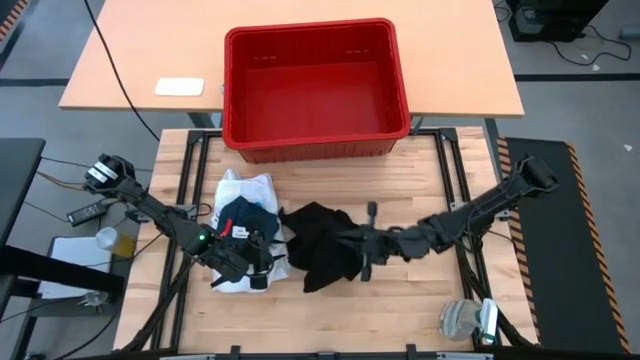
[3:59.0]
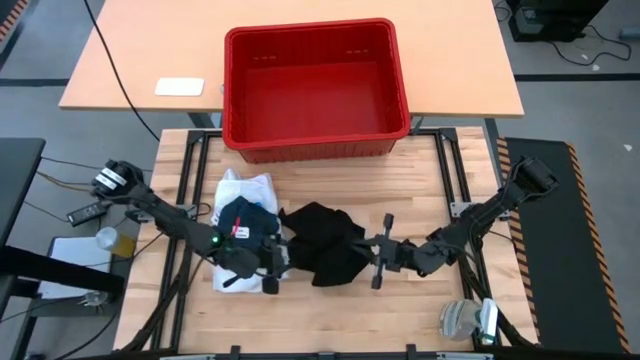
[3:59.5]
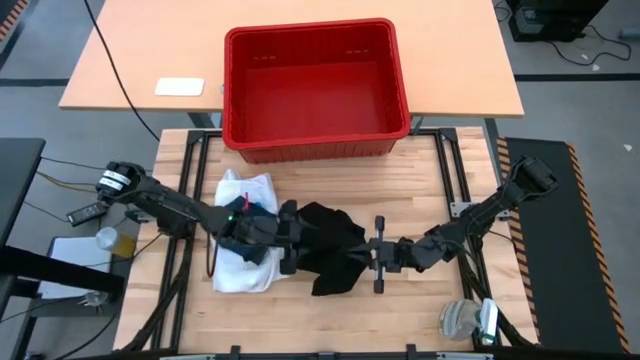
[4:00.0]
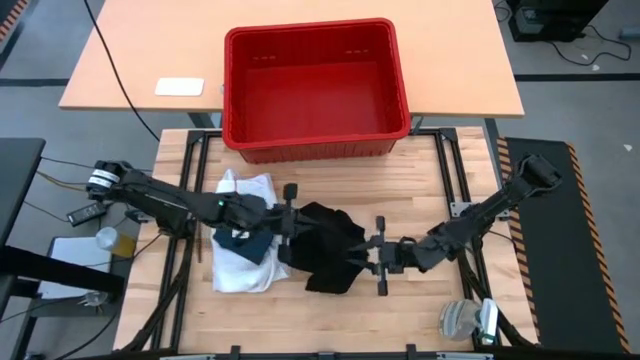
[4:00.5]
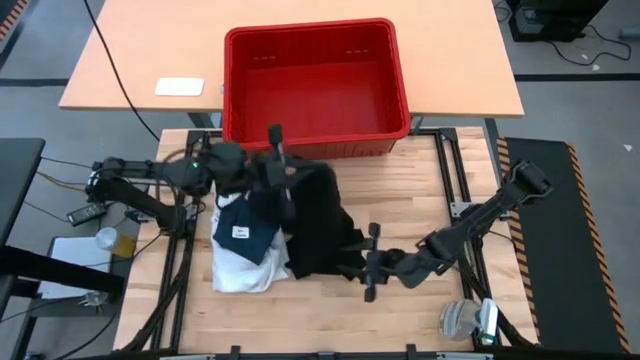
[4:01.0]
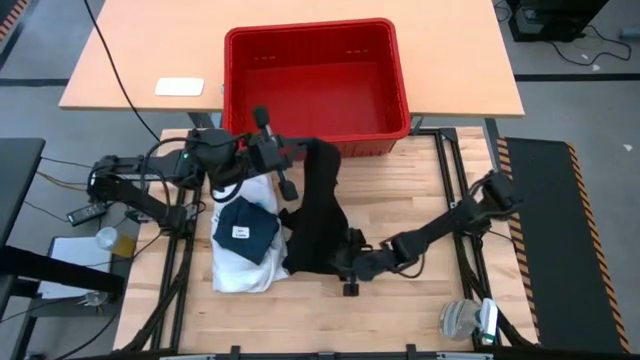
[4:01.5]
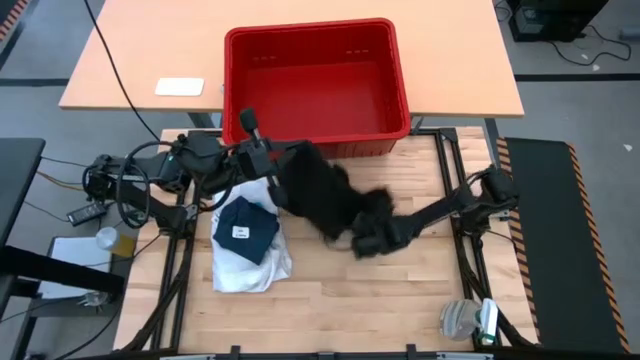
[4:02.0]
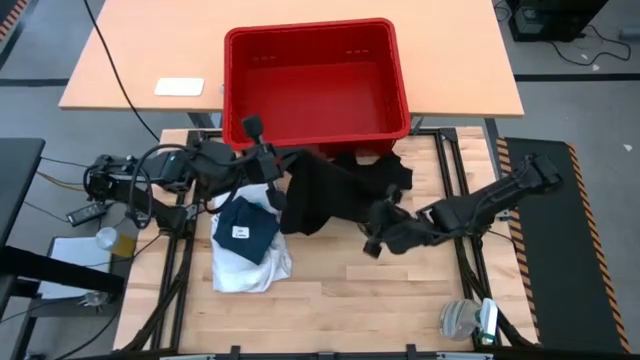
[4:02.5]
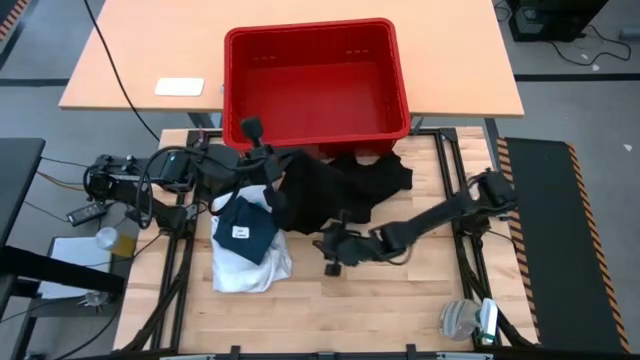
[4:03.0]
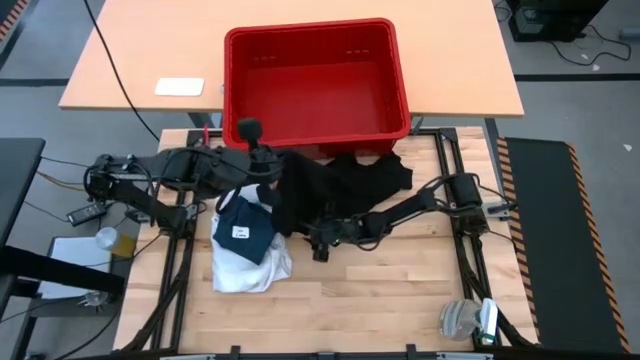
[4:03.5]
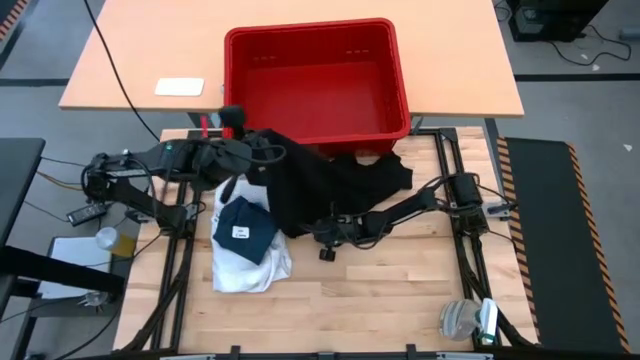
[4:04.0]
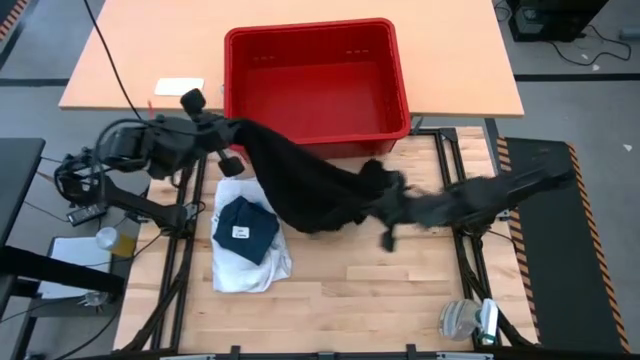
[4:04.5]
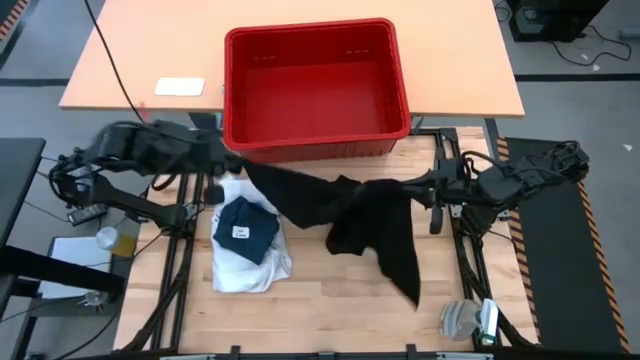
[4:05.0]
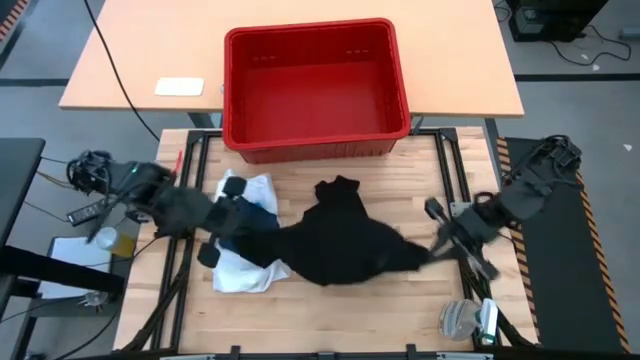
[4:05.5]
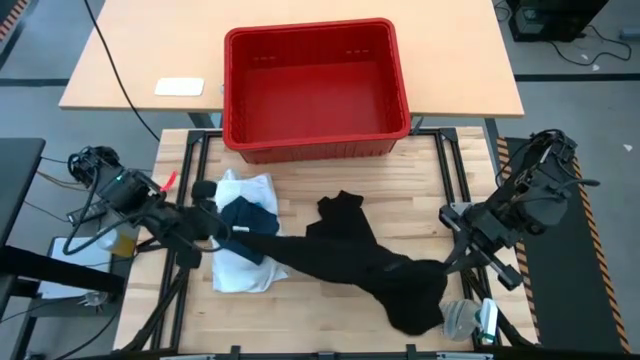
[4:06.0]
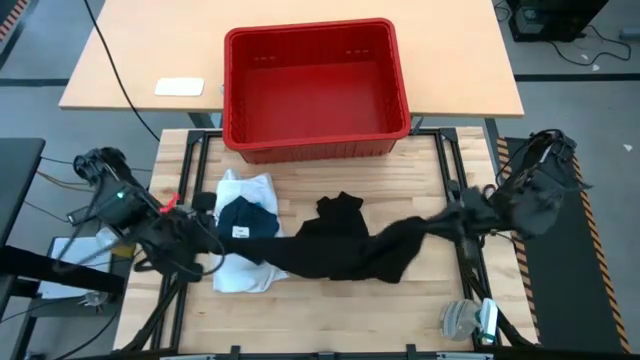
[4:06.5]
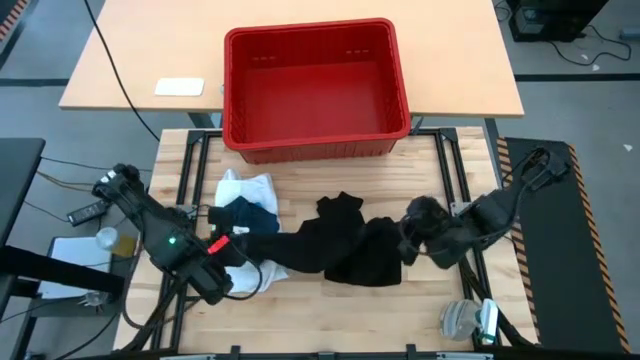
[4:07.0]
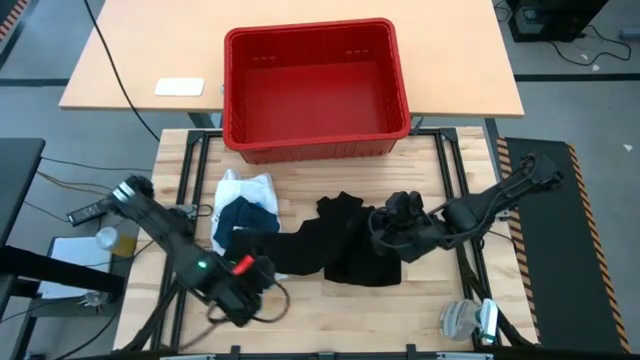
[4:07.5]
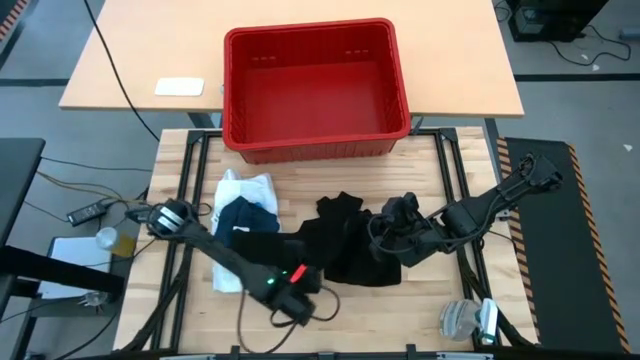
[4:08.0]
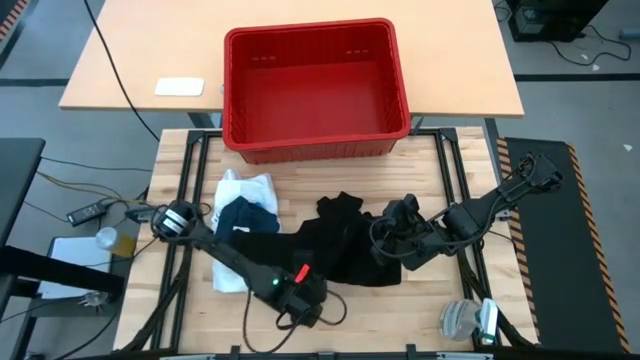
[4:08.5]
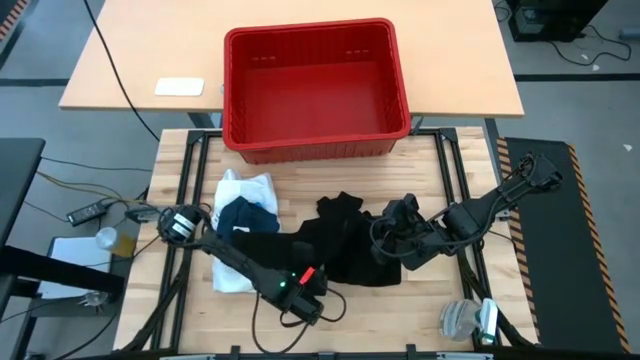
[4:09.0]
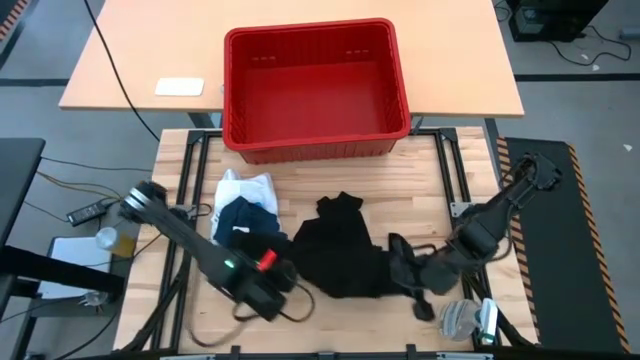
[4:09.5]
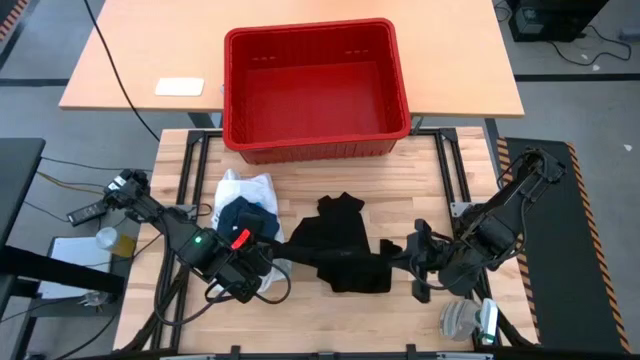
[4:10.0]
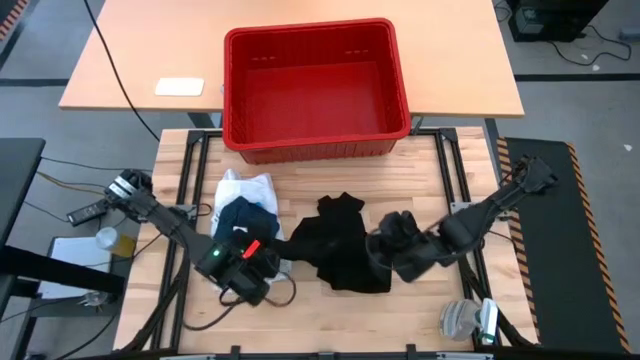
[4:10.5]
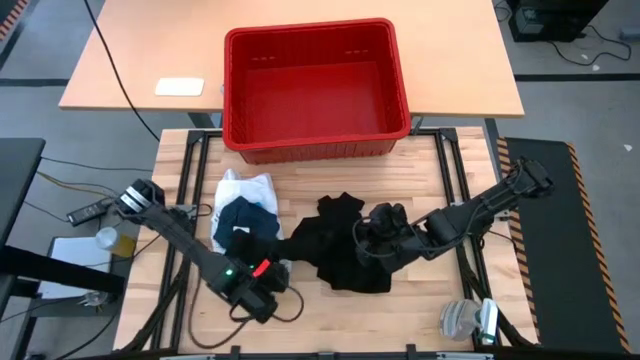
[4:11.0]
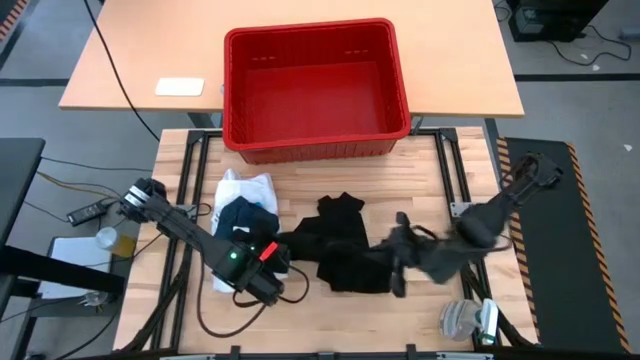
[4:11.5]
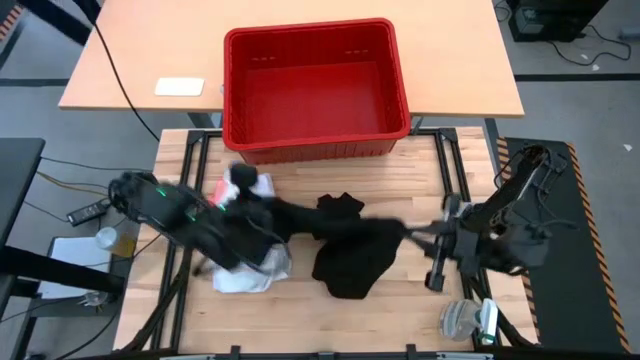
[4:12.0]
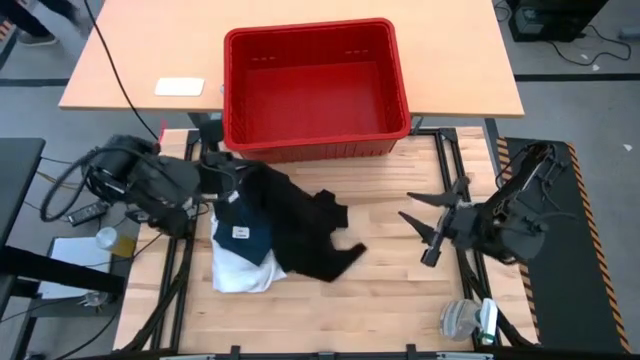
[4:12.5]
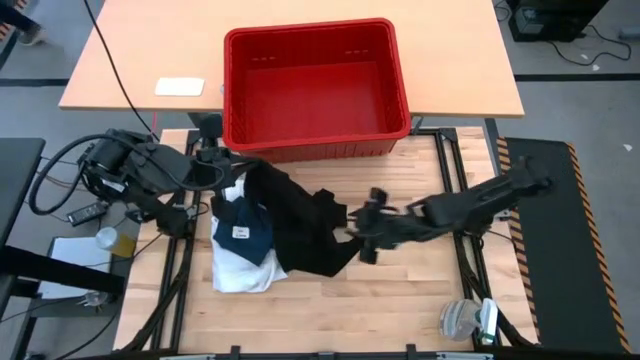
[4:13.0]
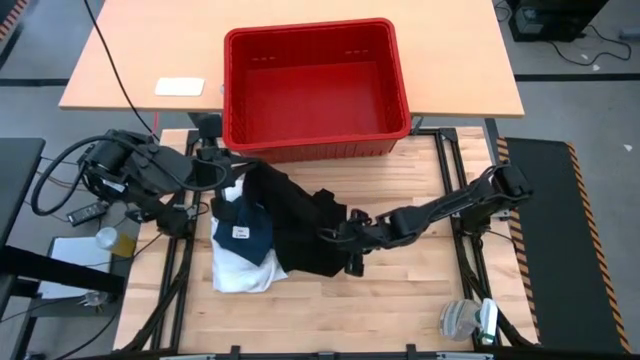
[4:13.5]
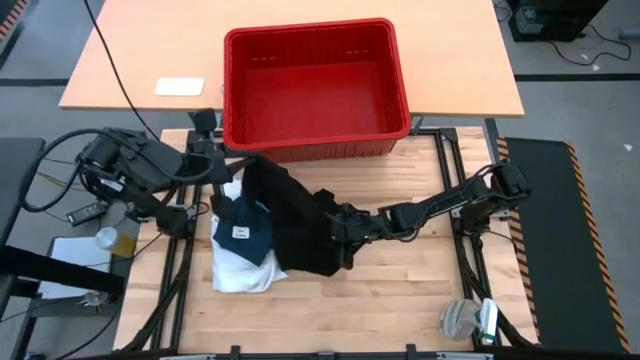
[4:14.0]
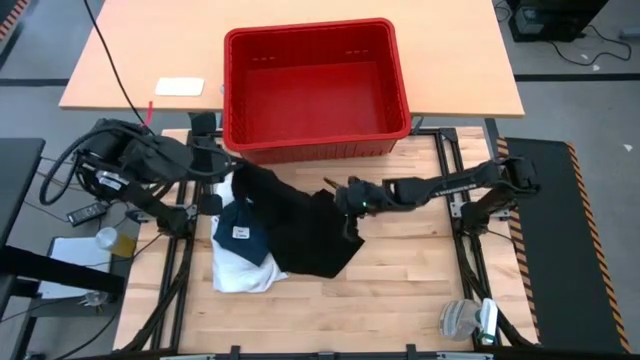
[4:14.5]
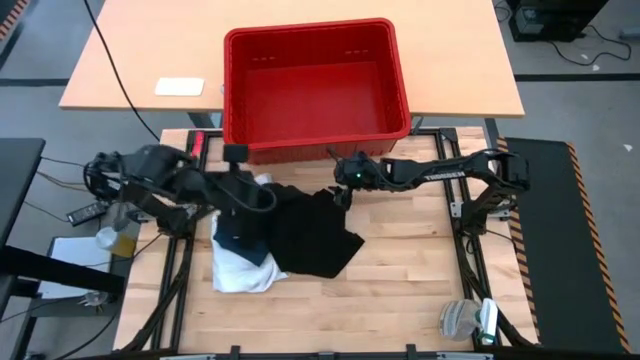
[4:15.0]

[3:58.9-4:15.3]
Task: Fold laundry
Fold the black shirt

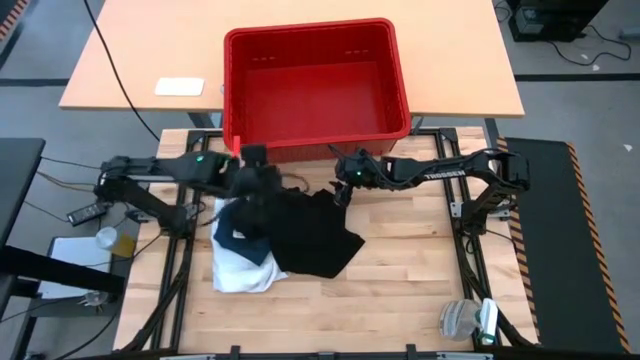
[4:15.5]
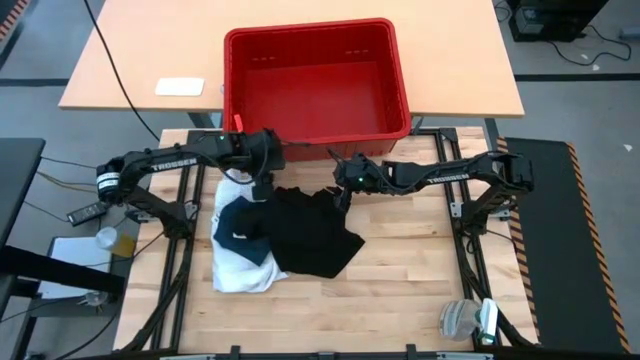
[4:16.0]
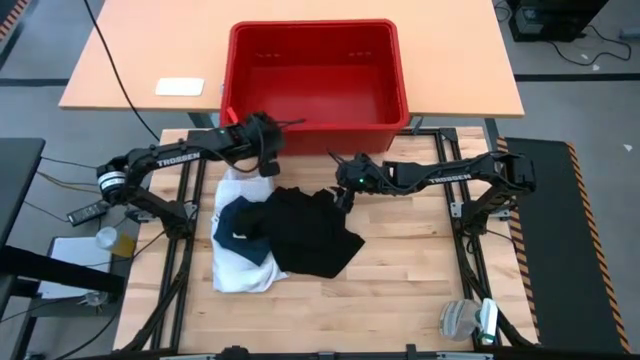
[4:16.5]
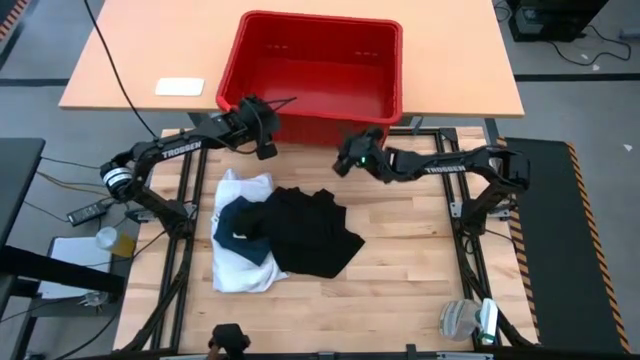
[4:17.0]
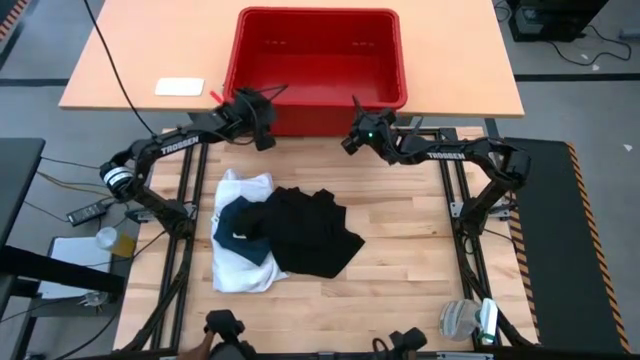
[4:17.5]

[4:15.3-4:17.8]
Adjust the red bin

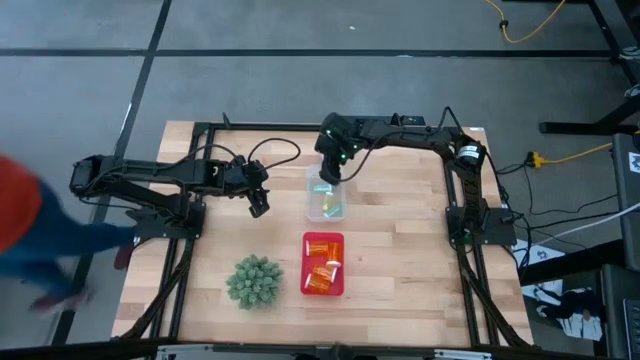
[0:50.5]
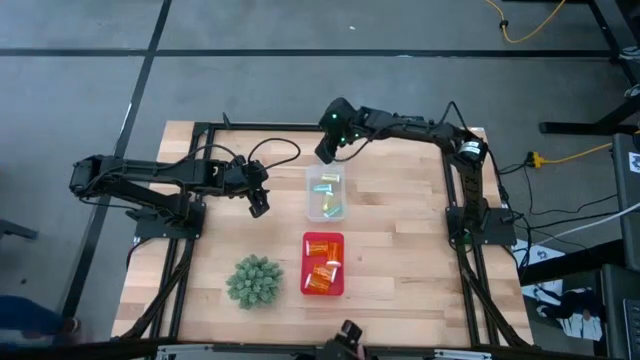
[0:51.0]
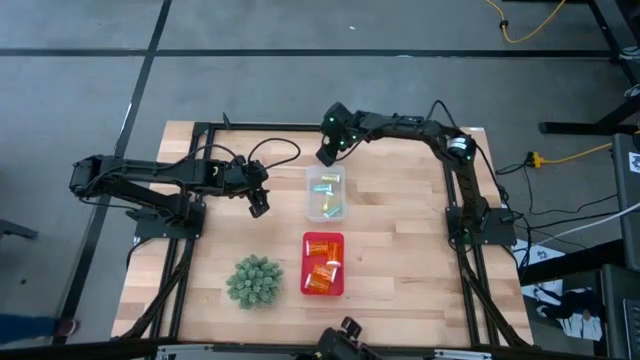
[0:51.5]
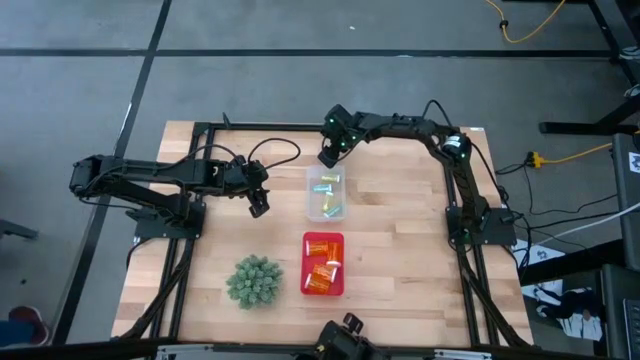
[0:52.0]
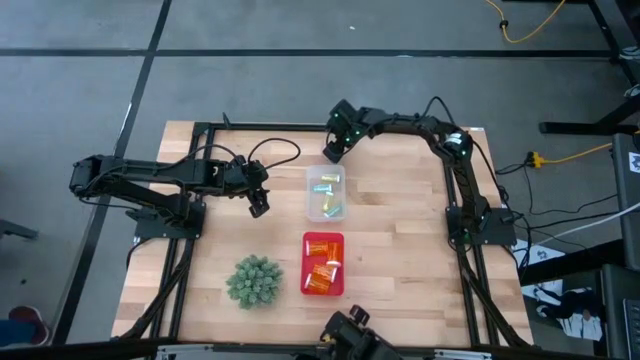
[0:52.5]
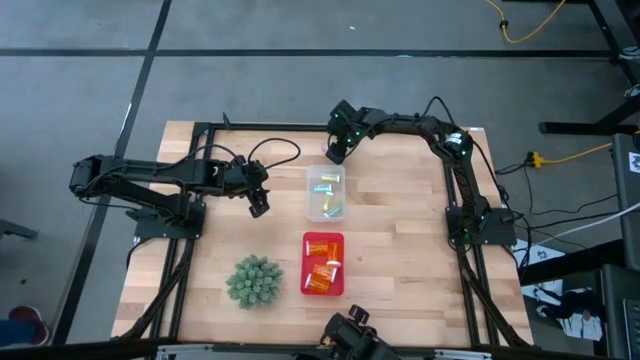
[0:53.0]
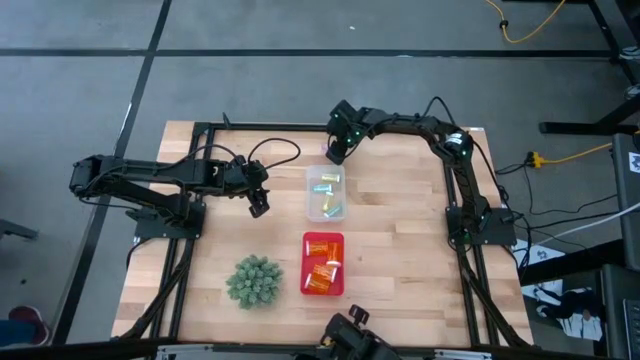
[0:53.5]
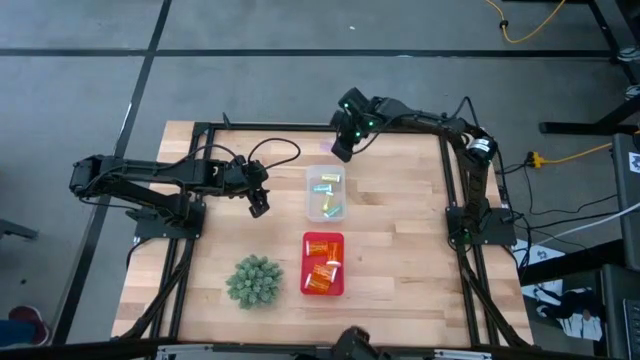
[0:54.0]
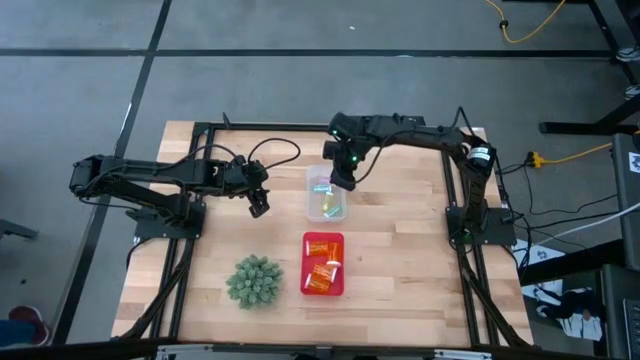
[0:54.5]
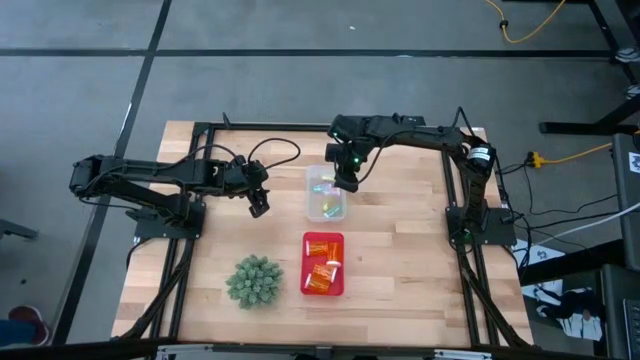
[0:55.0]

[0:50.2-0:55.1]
Task: Pick and place medicine bottles into bin by pill shape (circle, oval)
Put the small pink pill bottle into the transparent bin
